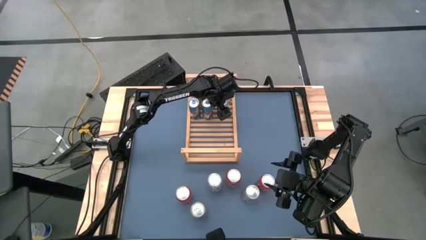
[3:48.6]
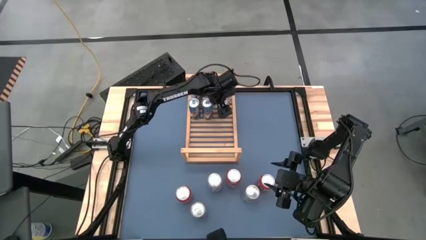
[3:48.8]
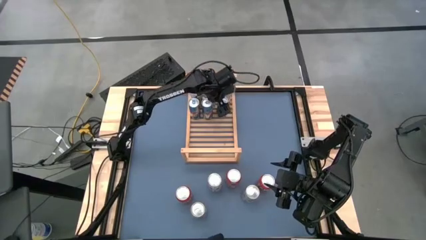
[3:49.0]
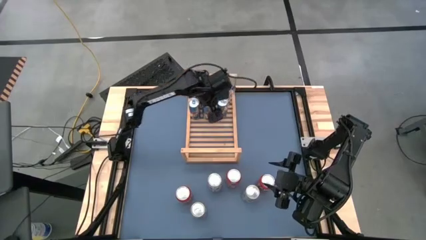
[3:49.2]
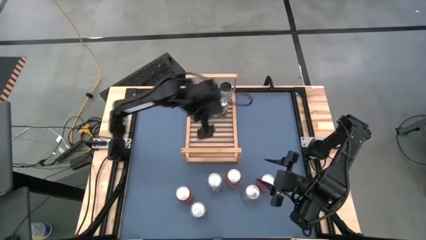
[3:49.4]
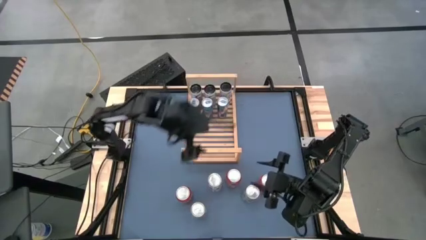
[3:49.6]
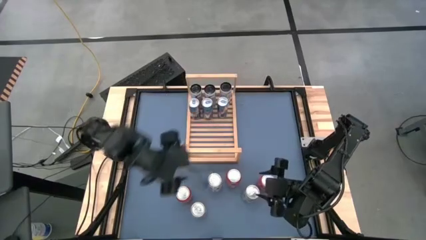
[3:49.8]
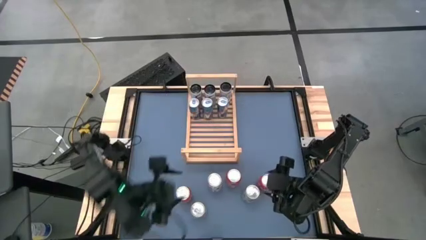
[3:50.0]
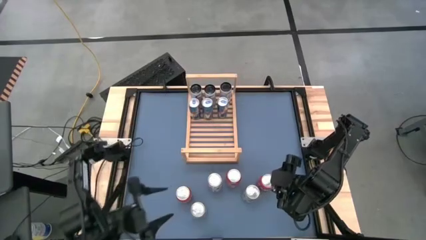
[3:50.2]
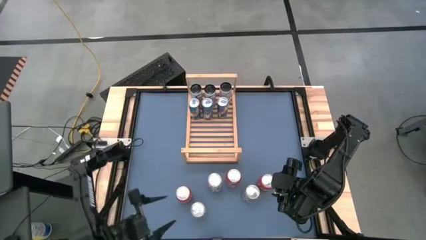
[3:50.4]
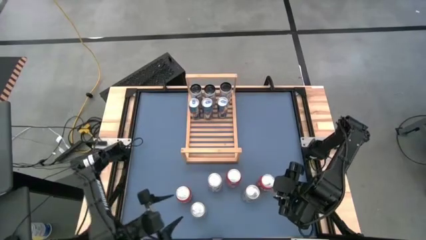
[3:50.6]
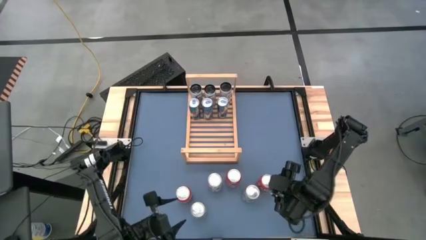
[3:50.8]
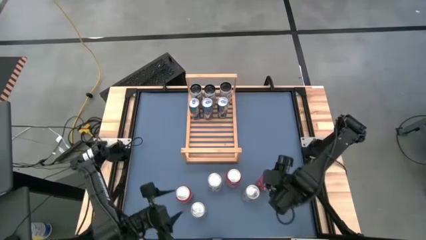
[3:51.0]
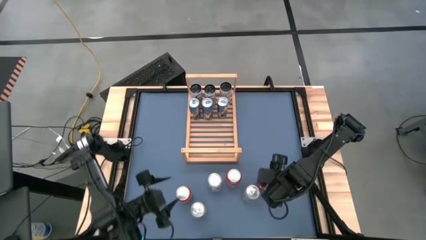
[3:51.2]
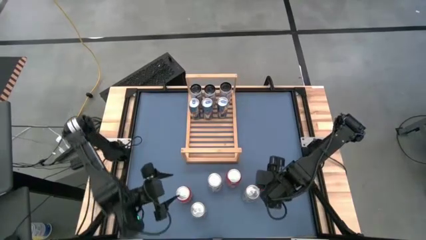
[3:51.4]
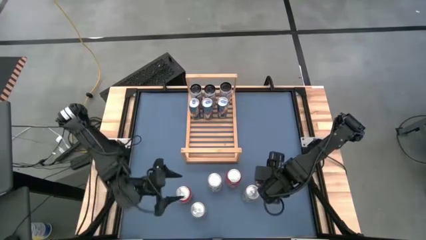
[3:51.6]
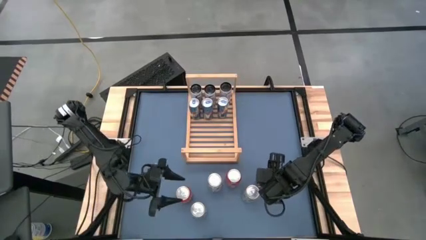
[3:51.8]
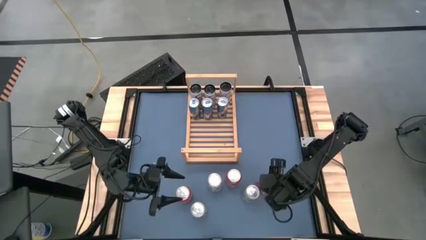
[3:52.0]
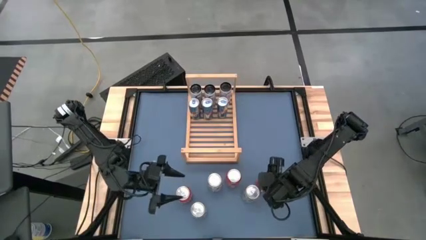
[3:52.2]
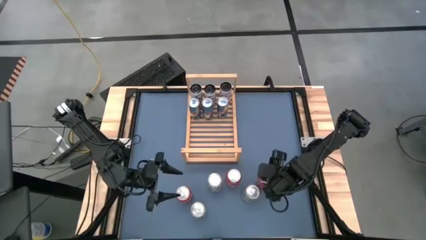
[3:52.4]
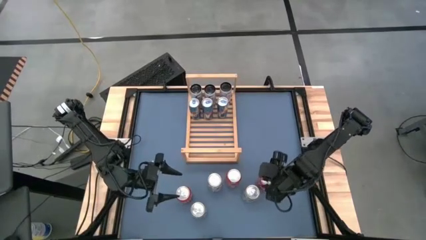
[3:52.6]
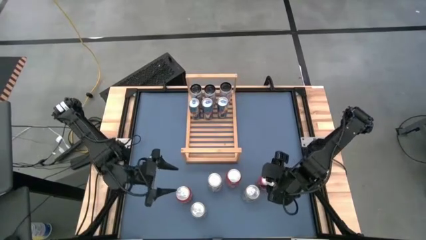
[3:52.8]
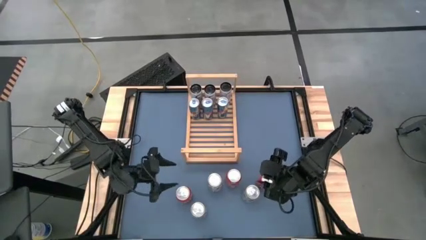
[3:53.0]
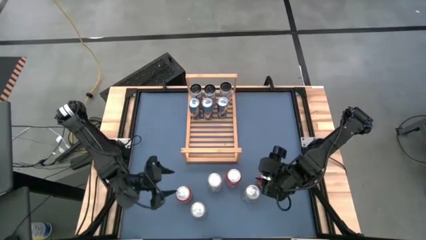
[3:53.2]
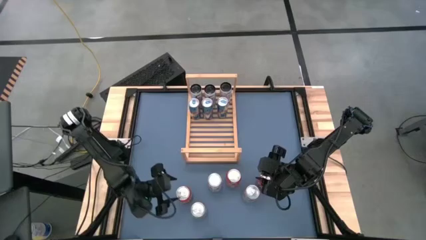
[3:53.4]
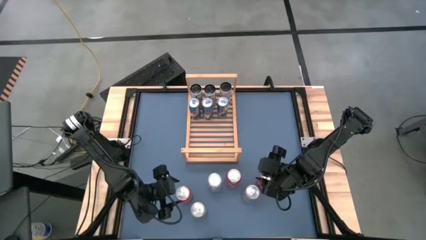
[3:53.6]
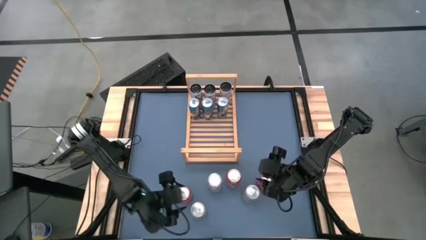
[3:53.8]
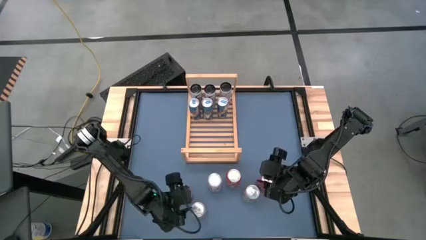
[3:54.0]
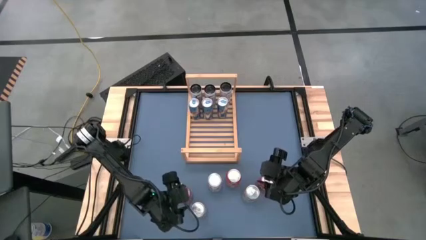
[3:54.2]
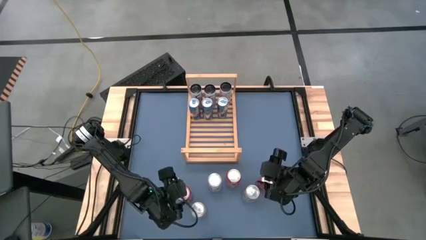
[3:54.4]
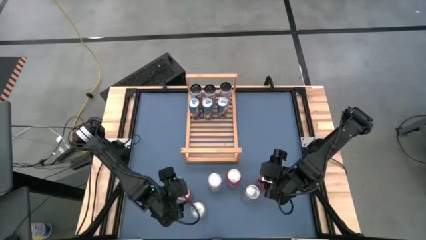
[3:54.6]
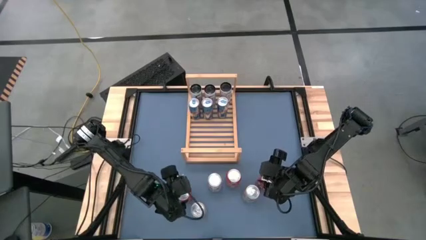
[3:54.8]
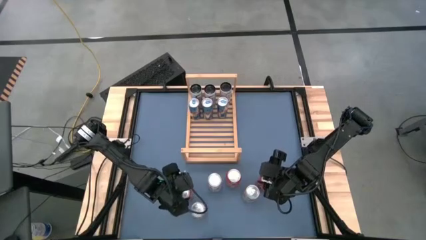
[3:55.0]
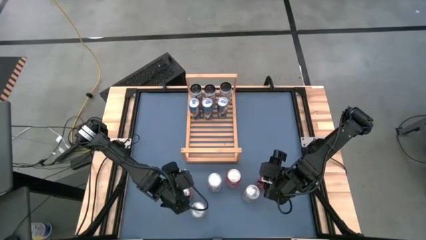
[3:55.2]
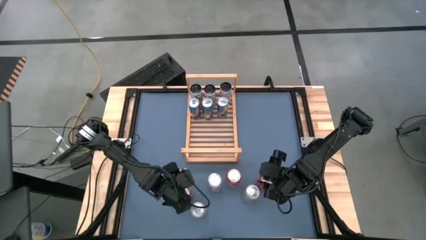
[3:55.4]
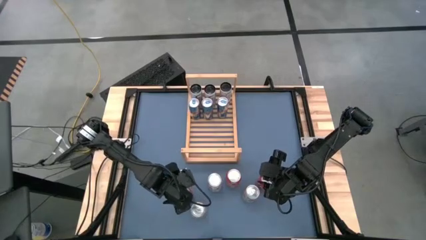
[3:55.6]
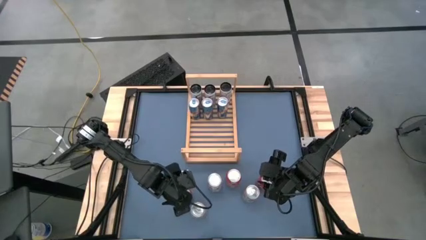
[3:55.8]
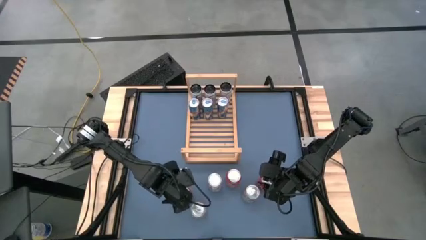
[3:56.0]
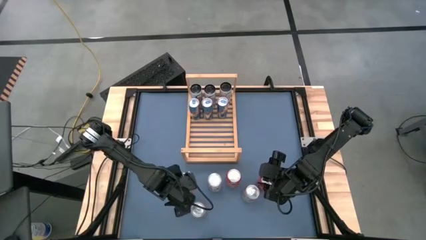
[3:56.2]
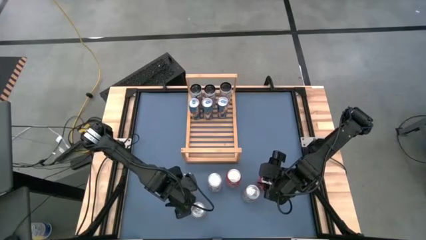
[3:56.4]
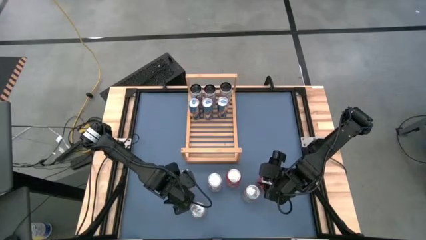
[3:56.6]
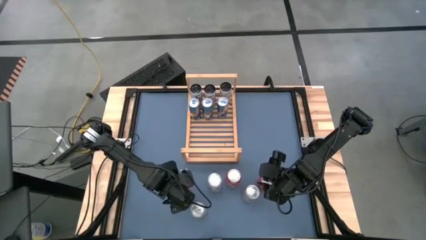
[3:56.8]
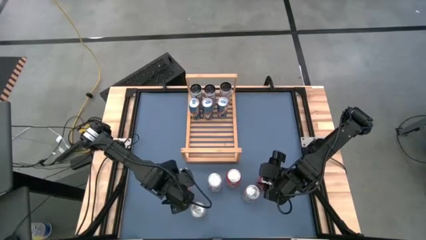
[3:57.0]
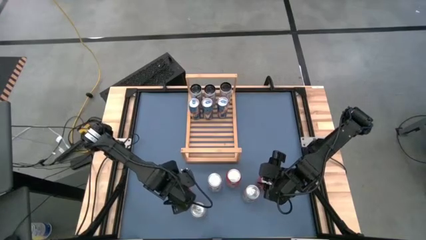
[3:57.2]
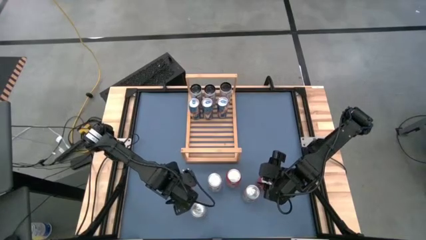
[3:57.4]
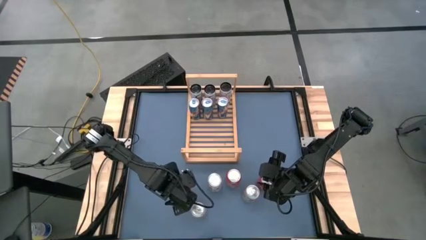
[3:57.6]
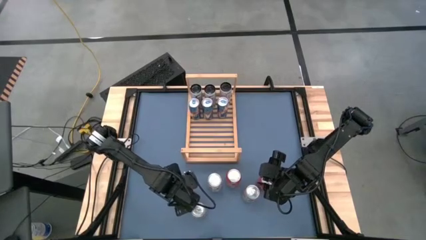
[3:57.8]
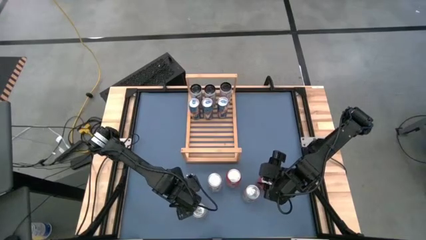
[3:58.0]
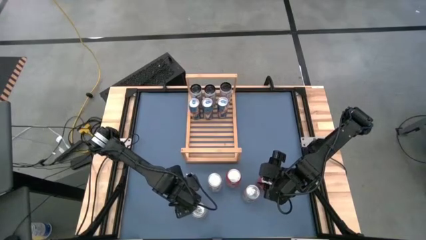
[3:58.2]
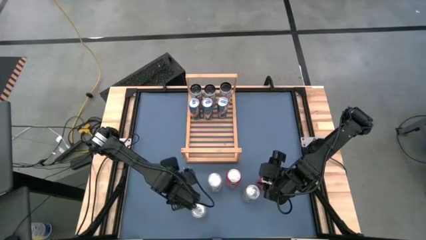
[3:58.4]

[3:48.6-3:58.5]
Task: Place canned beverage on shelf
Put the left orange soda can on the shelf

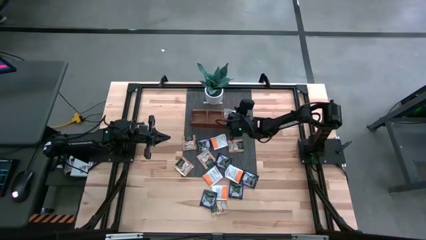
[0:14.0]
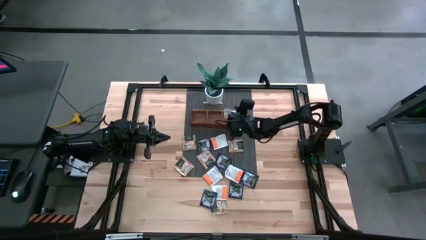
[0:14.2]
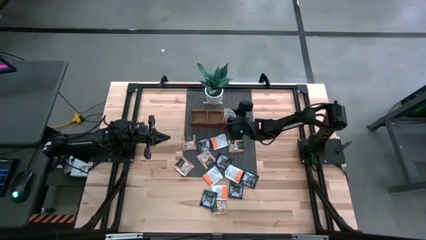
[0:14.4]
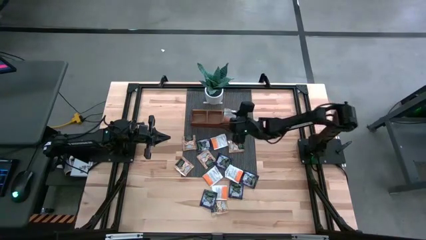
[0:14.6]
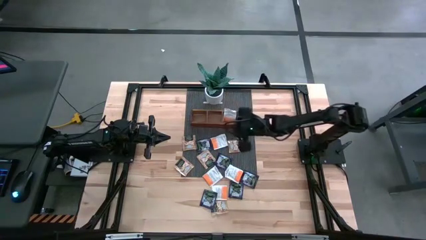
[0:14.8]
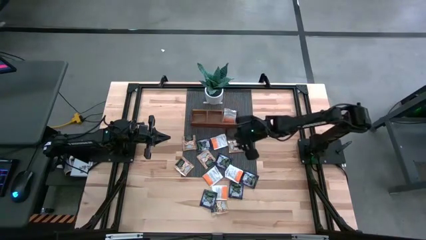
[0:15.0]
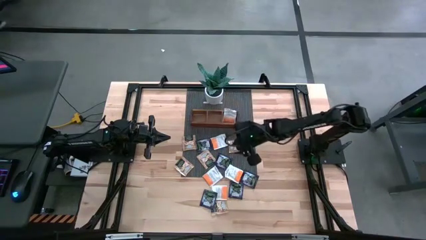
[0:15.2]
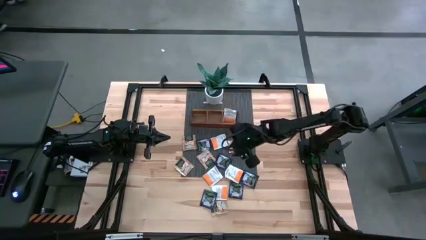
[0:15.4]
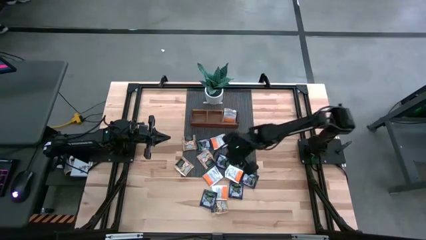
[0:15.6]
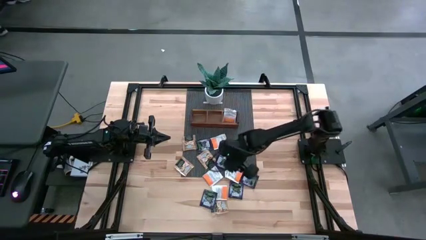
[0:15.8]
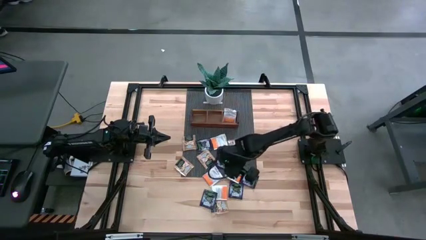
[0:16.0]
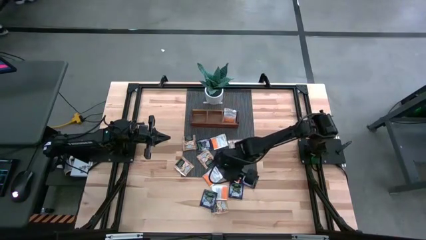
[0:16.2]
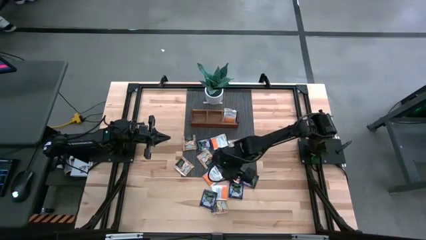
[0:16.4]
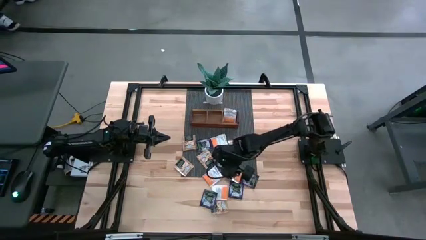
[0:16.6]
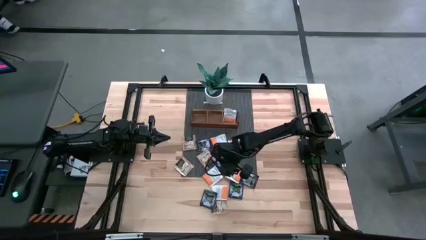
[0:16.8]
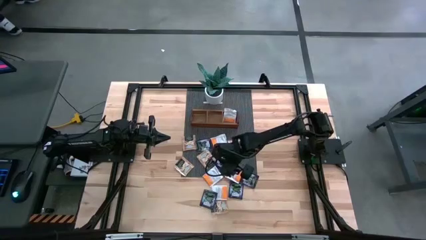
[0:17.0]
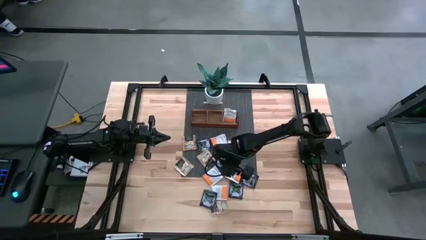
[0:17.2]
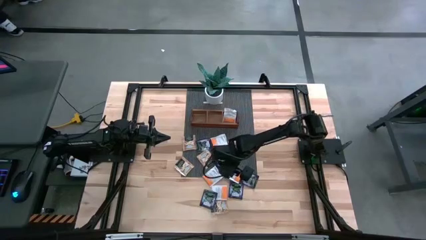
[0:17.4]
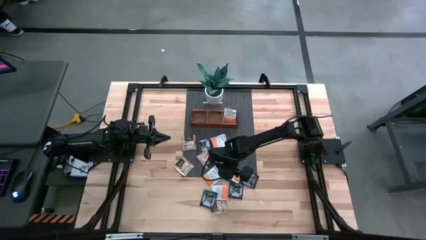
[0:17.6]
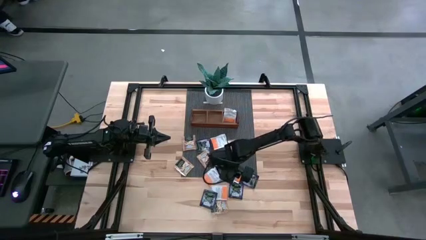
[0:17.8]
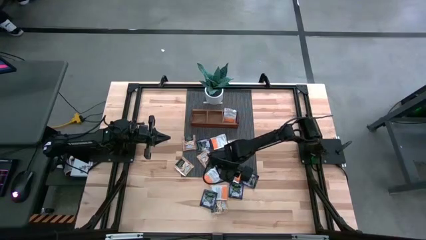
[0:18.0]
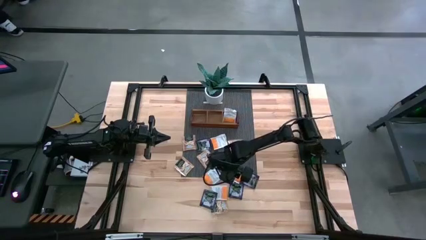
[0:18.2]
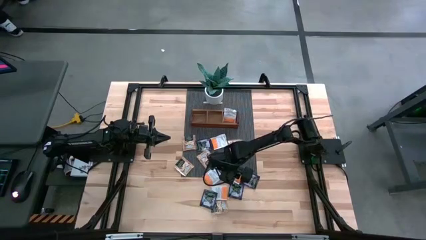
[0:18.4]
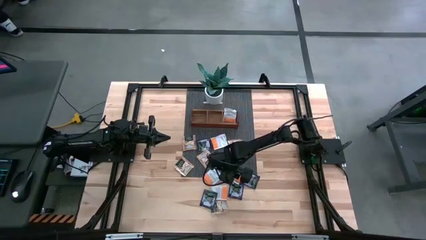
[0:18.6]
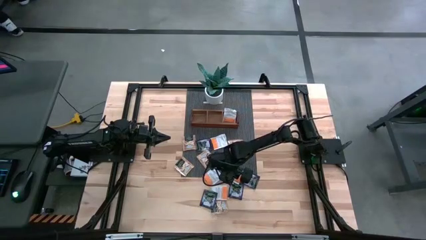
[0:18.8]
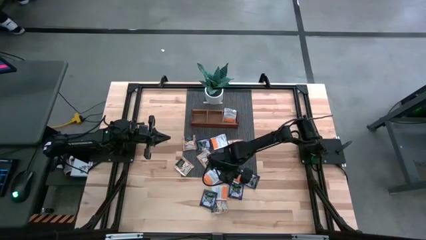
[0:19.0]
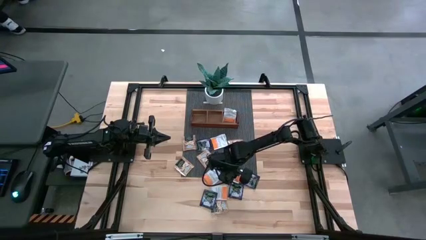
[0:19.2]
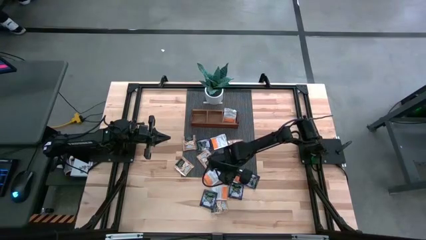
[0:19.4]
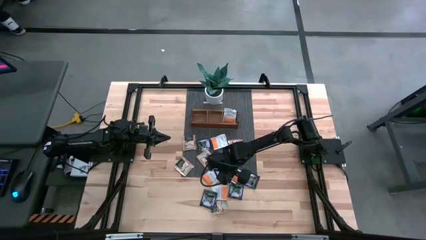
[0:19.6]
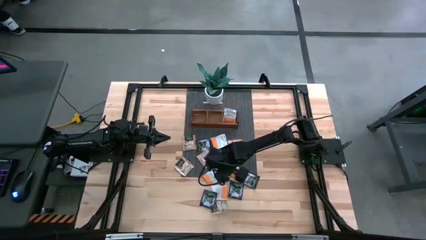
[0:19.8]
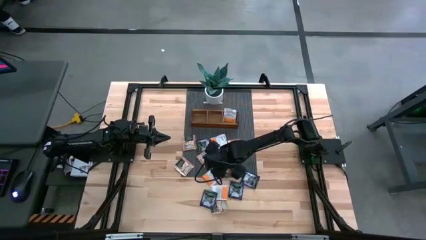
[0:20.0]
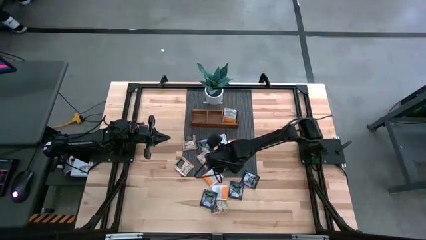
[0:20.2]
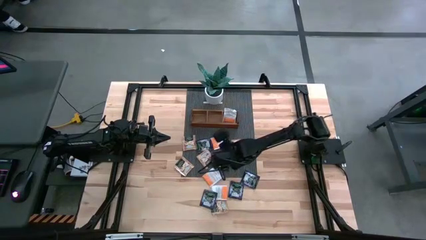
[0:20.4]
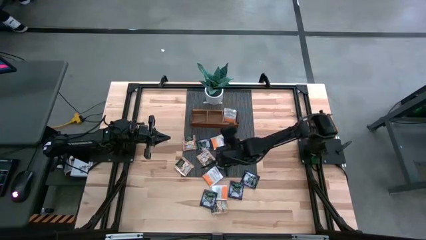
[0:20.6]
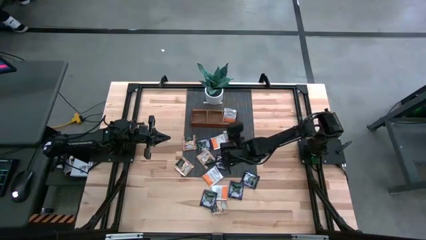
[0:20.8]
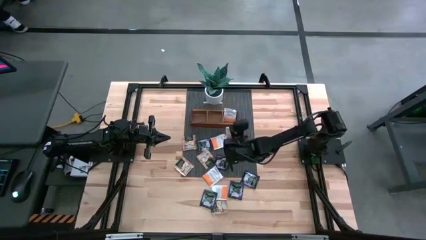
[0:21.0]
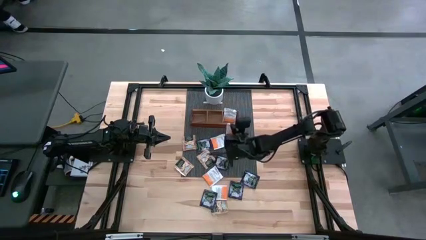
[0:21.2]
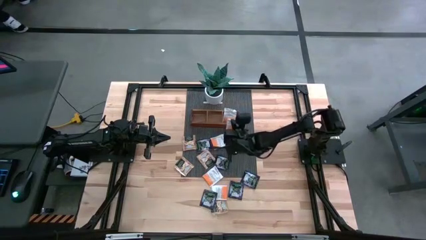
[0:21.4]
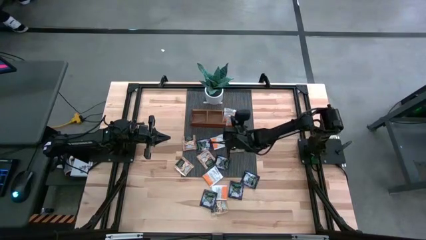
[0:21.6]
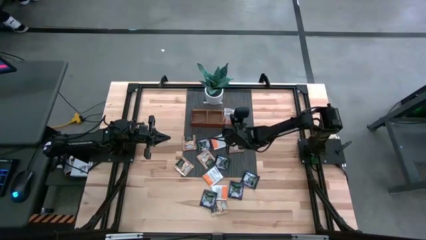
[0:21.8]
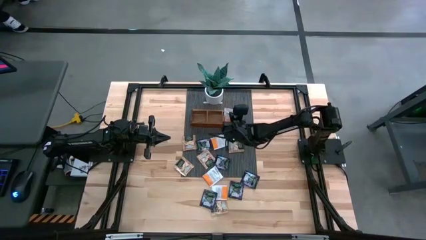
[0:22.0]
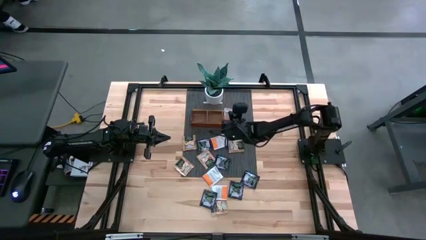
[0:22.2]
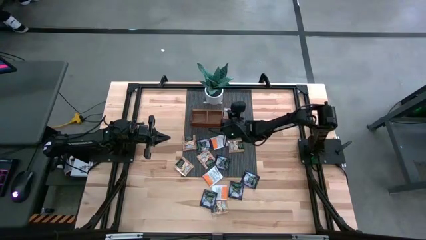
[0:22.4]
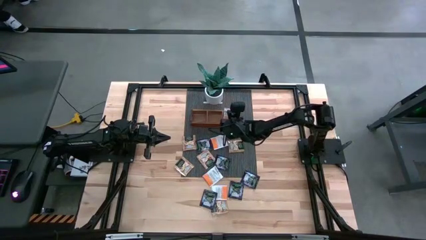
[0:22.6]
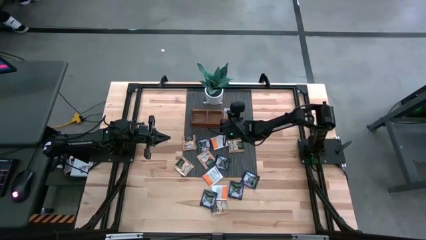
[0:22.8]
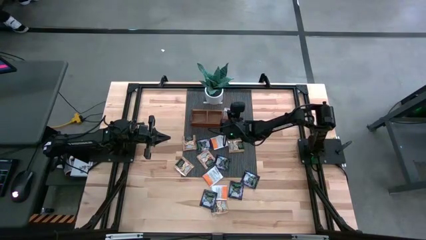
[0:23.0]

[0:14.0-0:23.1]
Task: Pick & Place Tea
Put the orange tea bag into the right section of the wooden organizer
